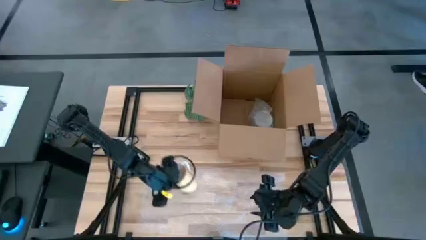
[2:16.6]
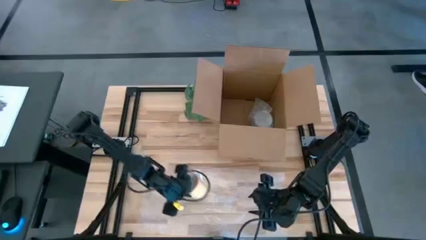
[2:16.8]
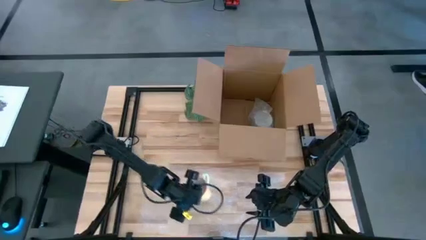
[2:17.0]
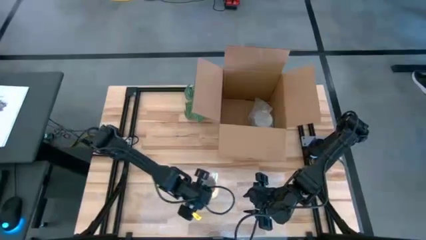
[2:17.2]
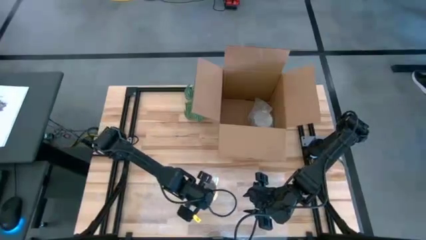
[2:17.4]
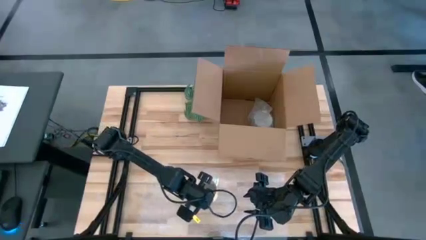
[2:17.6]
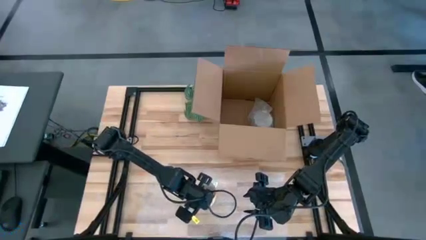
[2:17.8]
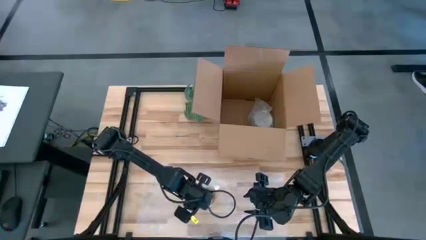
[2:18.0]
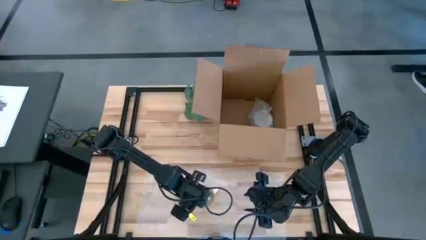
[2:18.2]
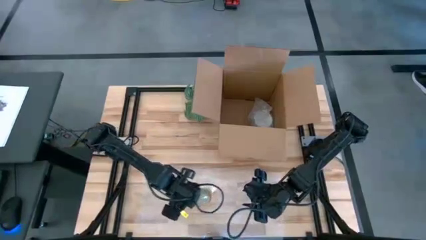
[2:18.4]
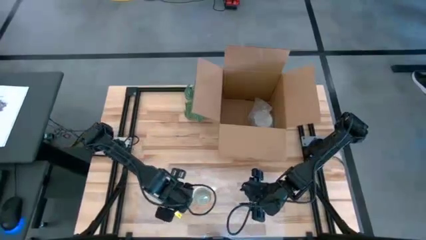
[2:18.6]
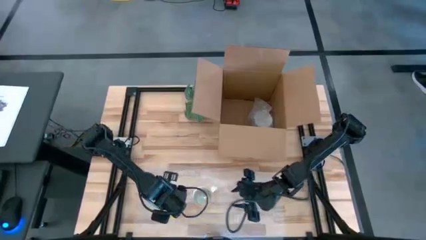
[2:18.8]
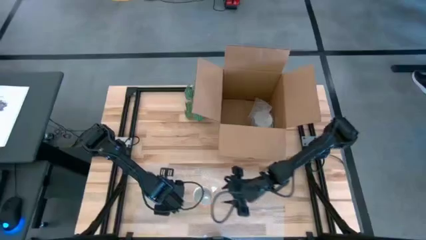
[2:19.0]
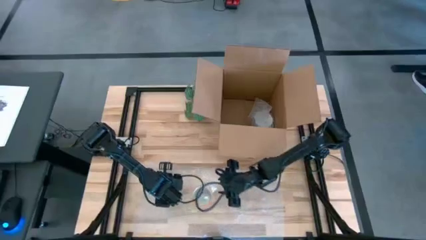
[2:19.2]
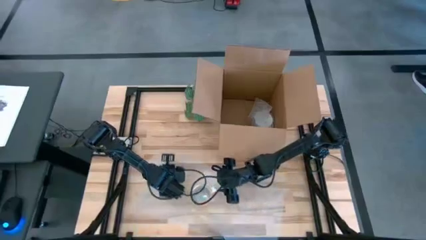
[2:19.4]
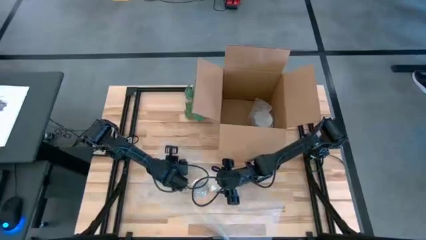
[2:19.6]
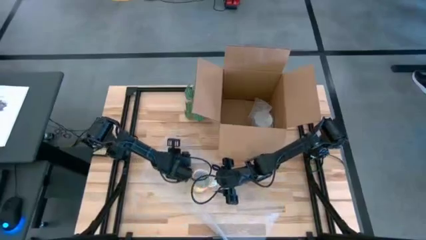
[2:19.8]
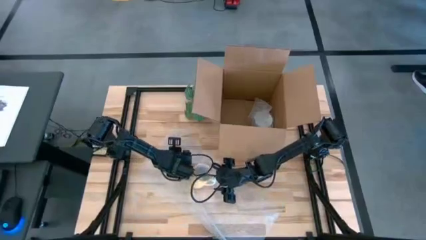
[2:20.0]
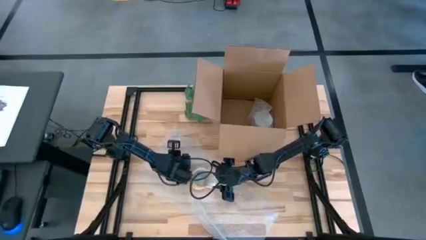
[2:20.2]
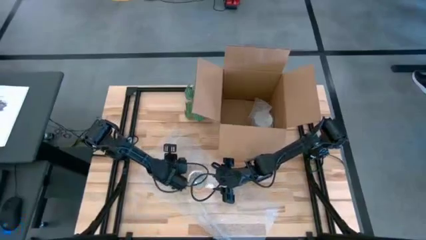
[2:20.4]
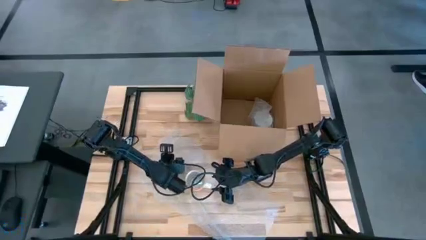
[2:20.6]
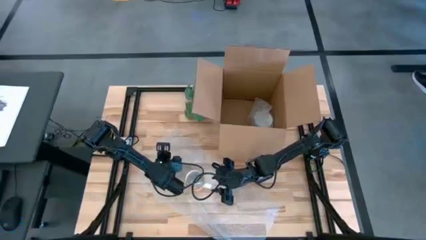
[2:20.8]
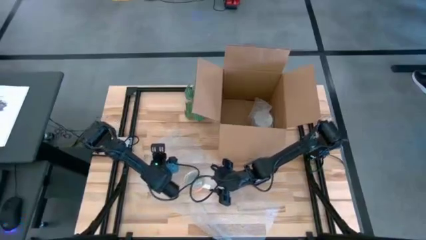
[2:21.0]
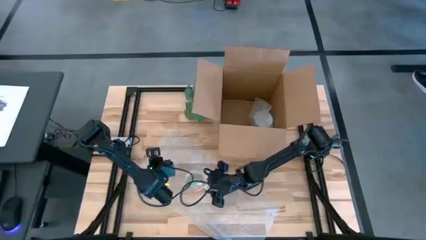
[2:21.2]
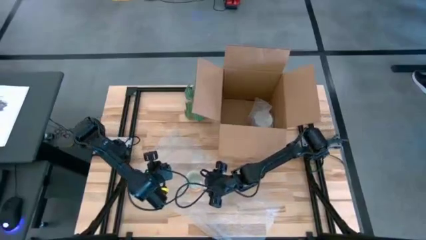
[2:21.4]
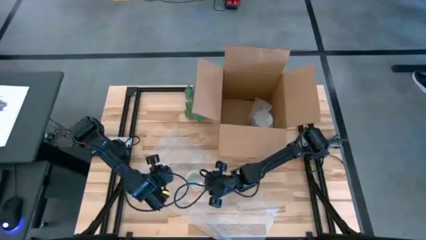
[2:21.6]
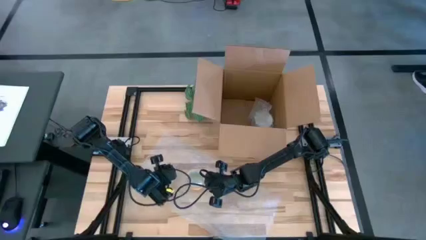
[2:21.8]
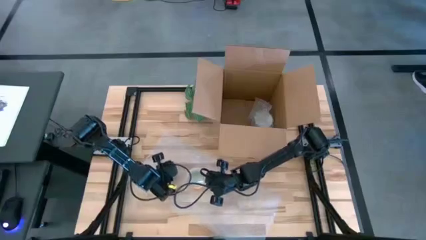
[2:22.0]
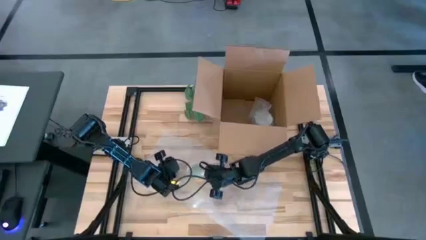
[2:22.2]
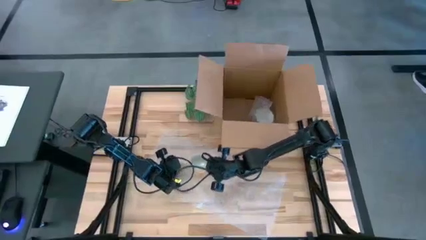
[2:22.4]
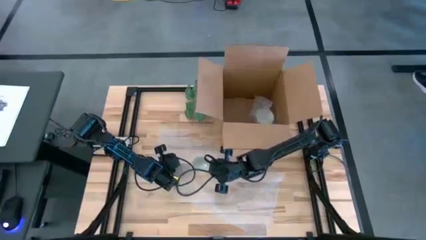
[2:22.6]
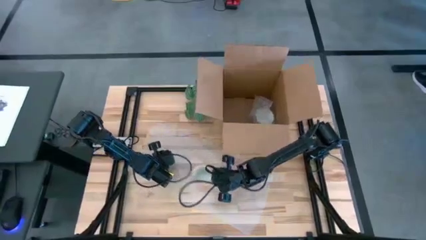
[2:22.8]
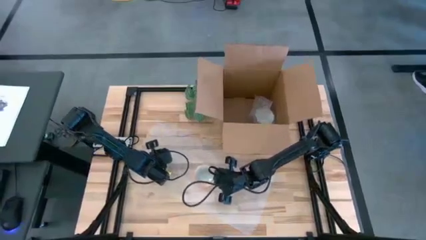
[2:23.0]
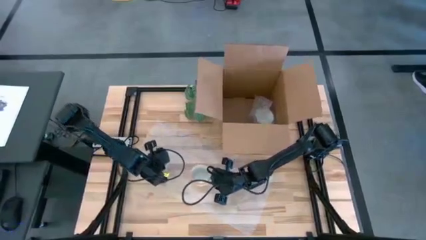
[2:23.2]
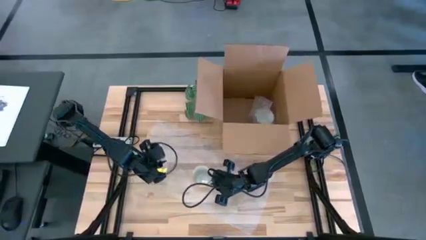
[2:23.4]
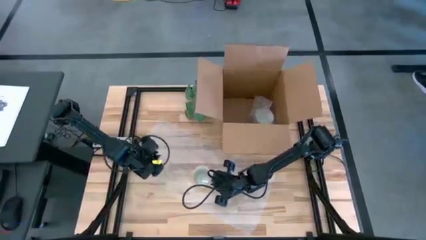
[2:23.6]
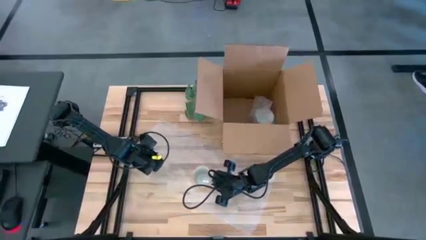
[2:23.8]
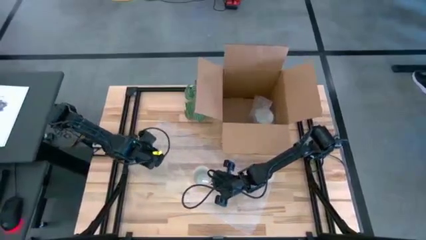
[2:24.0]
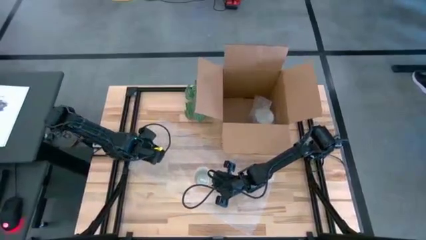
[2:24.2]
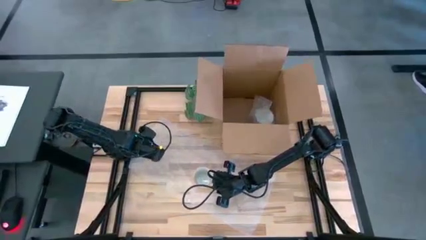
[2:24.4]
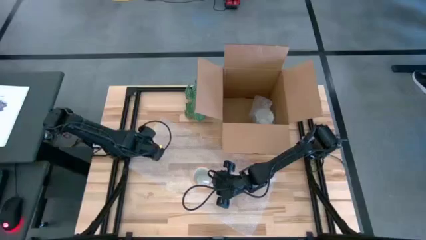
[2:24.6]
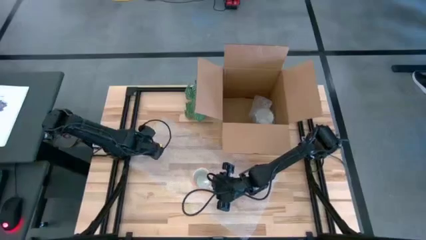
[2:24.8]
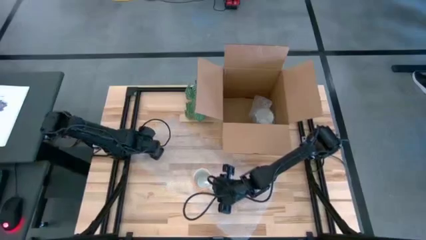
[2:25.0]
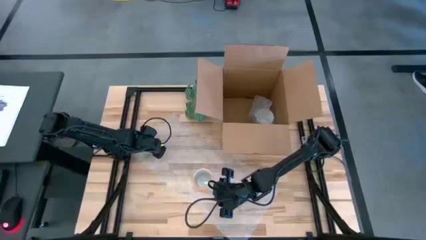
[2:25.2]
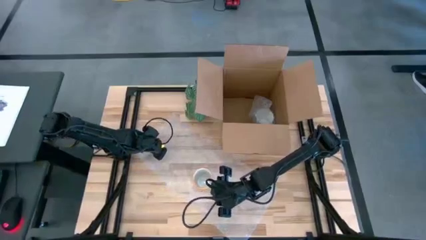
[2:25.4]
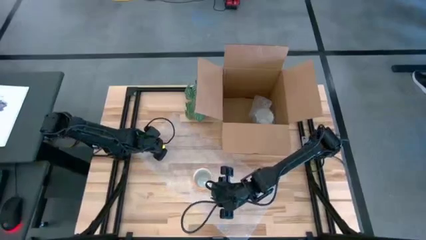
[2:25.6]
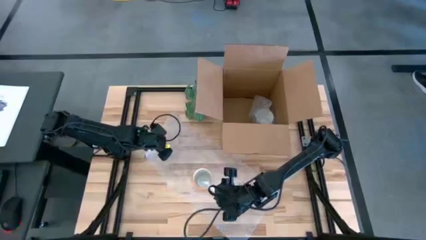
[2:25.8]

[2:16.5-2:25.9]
Task: wrap mug
Put the orange cup in the bubble wrap

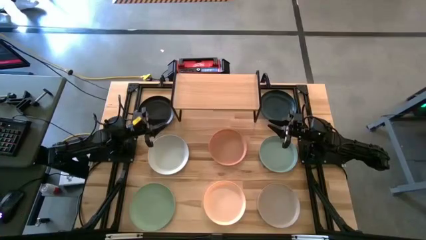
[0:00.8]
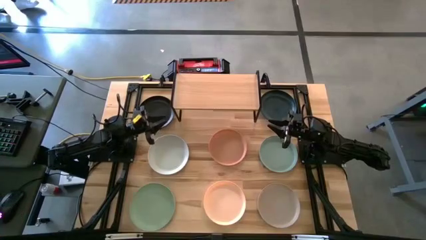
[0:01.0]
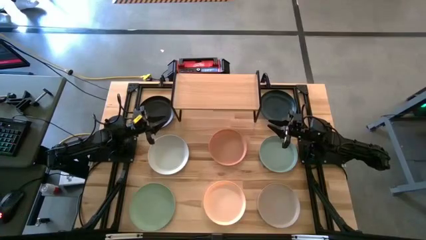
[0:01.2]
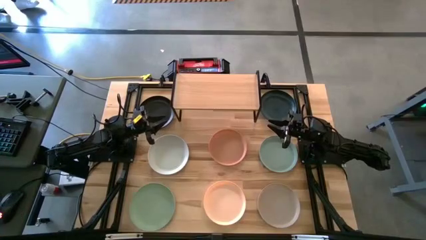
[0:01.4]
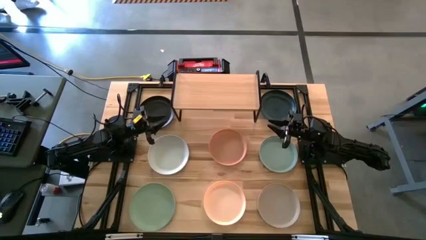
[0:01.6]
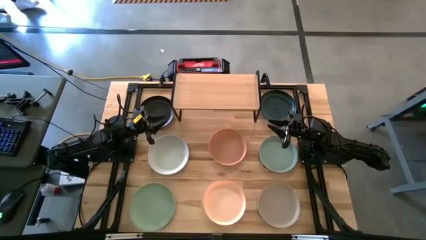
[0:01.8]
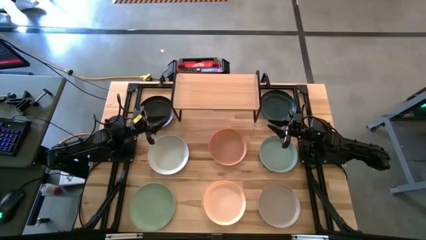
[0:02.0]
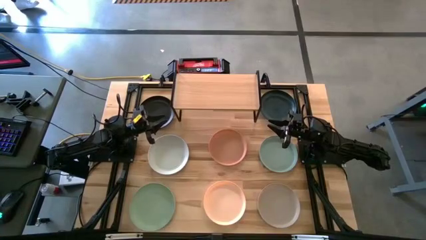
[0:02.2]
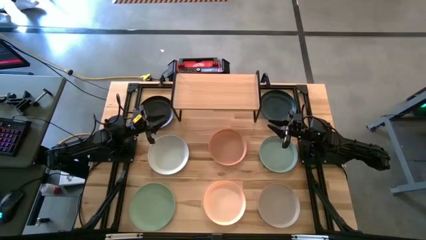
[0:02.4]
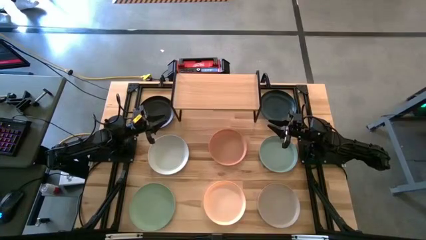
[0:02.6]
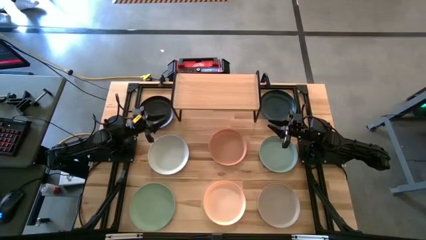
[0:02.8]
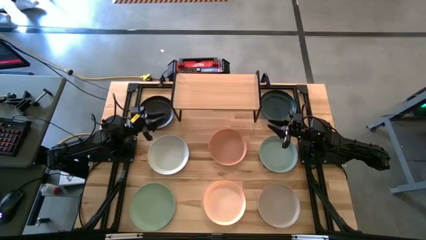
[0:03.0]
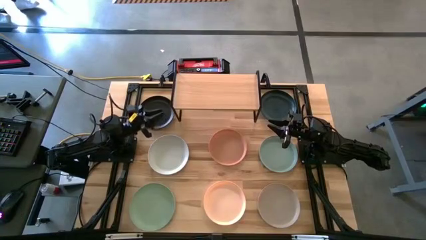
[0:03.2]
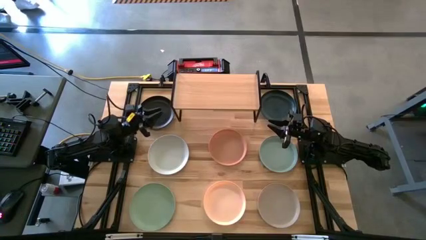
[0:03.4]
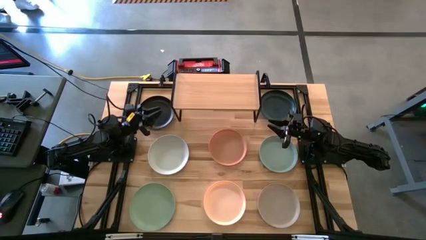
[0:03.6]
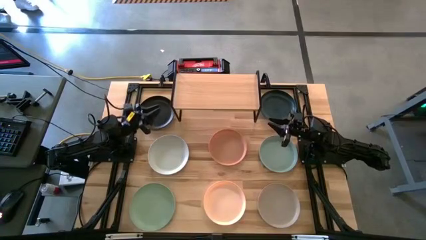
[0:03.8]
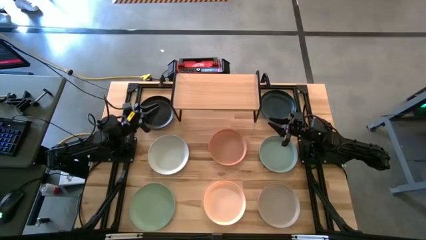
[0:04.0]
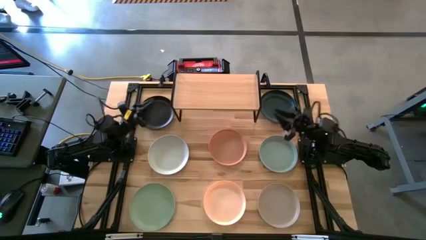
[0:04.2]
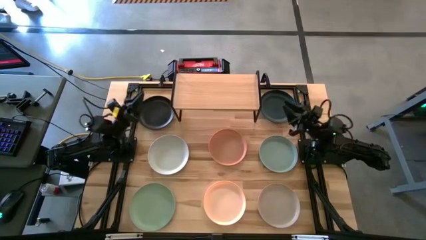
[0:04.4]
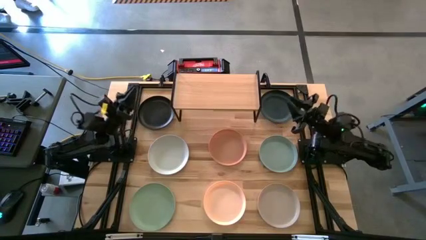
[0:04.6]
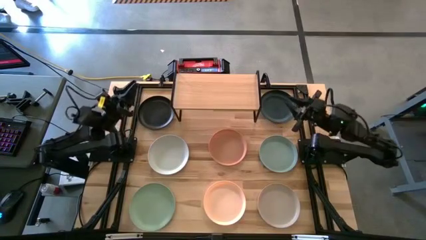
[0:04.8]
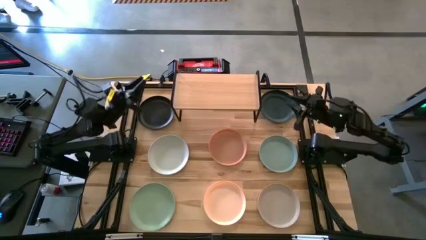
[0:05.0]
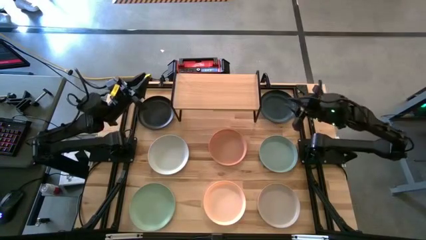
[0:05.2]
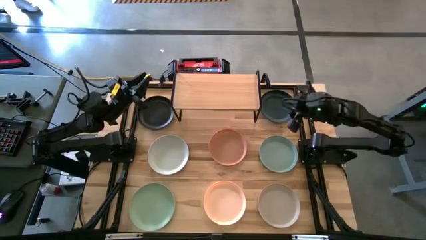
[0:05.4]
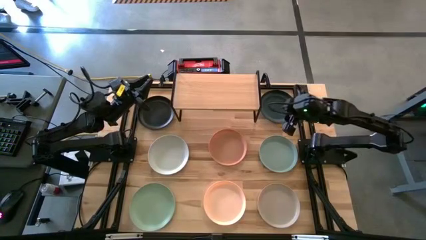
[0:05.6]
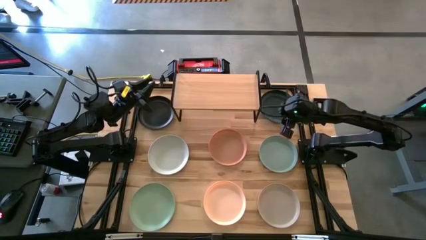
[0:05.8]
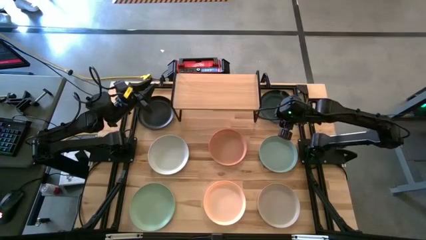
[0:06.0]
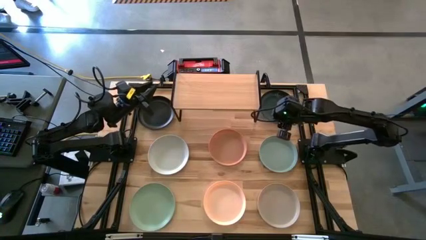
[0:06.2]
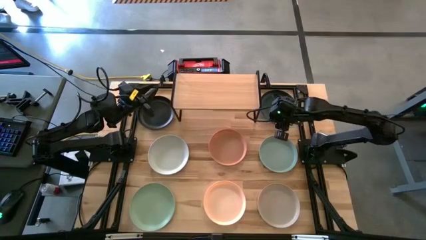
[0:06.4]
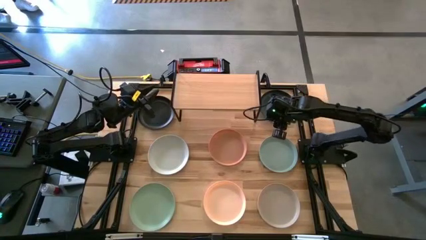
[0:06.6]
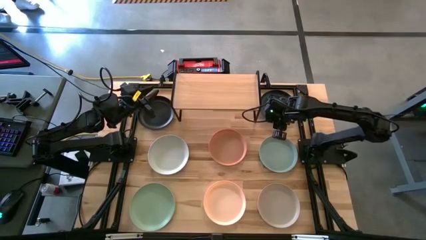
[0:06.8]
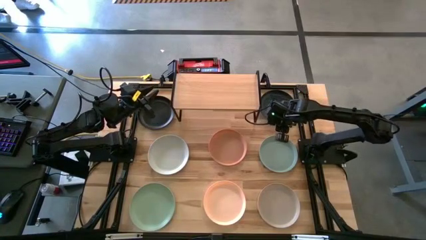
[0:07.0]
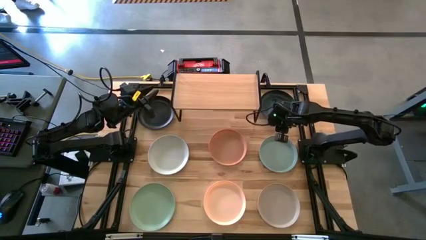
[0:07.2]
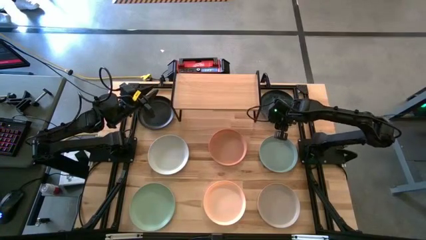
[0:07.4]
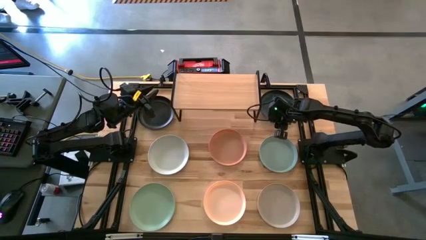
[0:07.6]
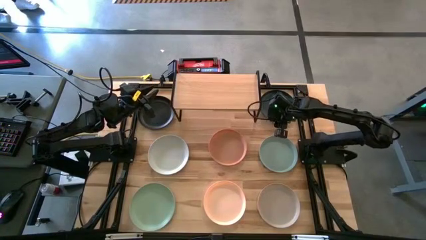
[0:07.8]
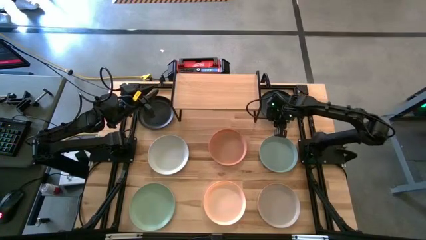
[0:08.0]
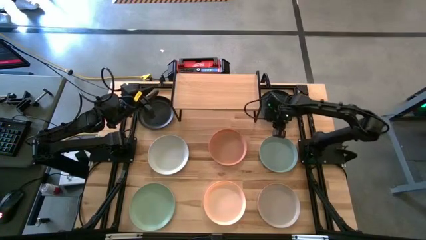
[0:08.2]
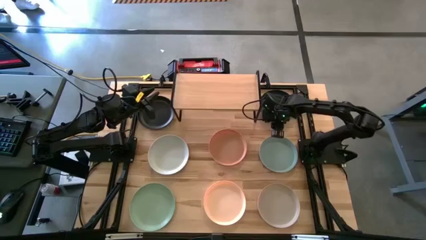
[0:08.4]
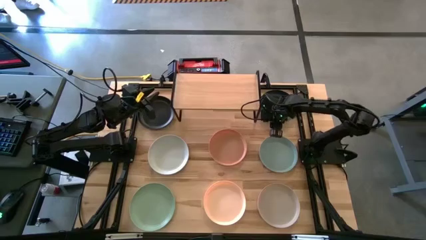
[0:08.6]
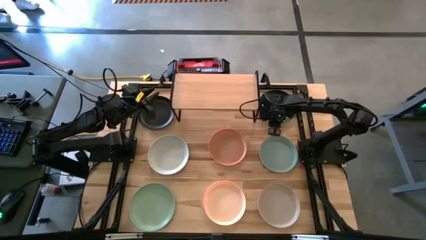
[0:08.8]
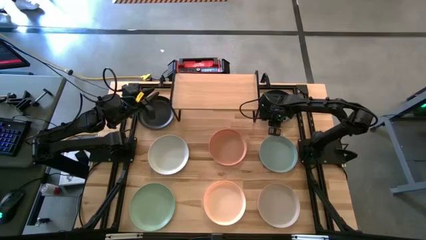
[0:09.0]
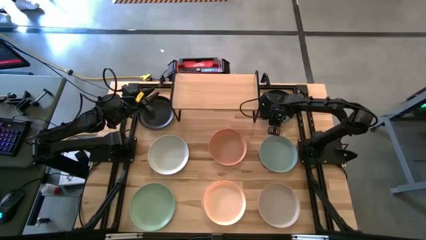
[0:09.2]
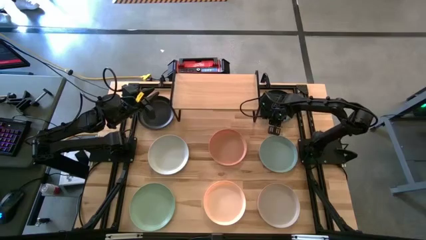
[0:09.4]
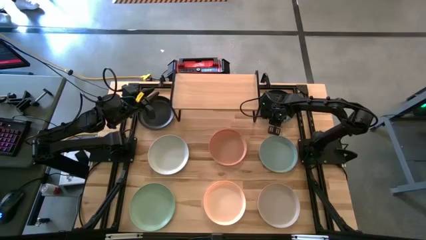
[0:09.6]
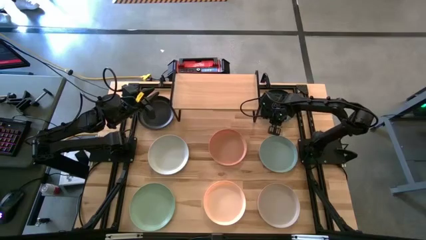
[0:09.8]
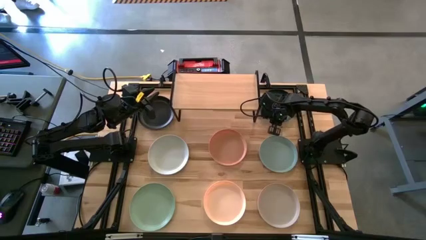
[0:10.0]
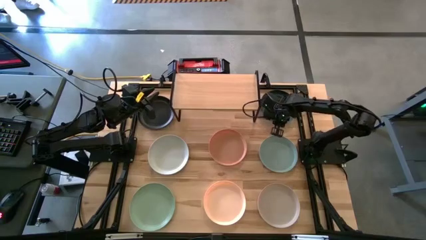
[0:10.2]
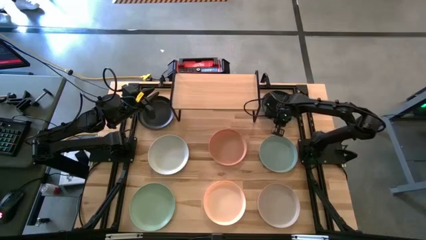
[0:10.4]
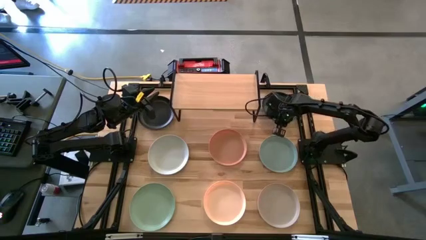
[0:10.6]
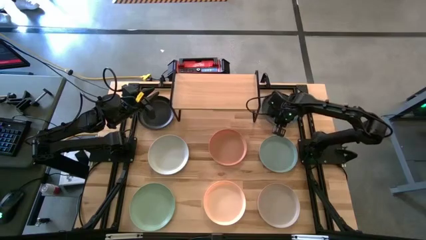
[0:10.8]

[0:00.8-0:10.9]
Task: Place and stack plates onto a shelf
Put the right black plate on the shelf
